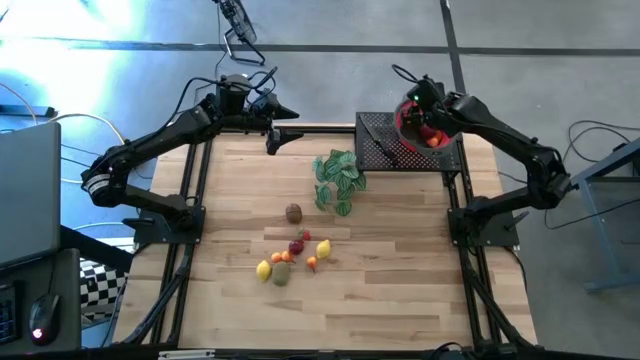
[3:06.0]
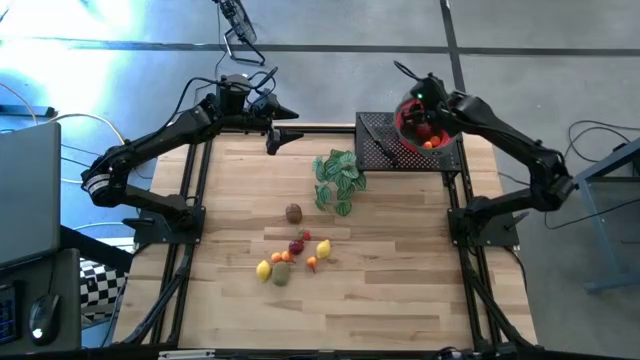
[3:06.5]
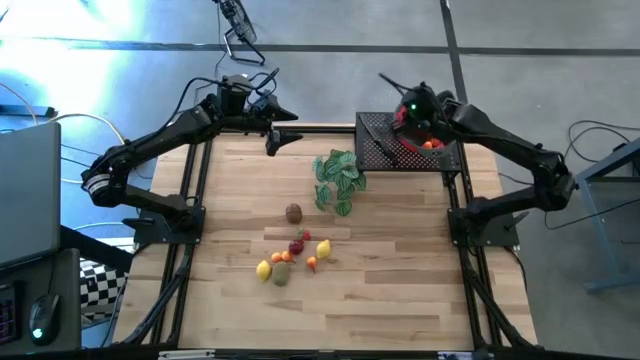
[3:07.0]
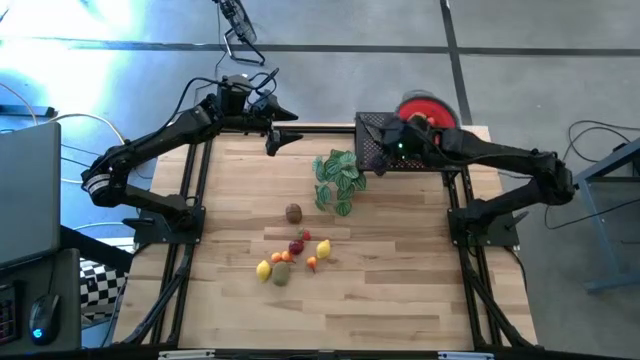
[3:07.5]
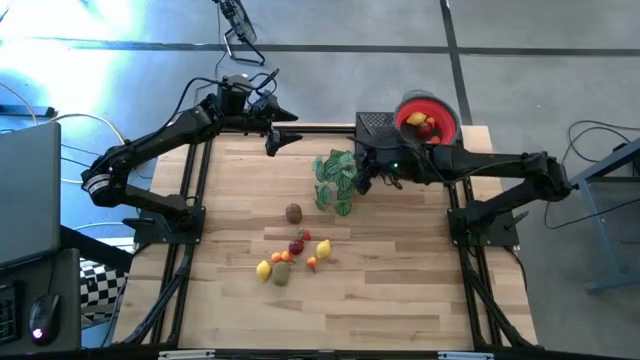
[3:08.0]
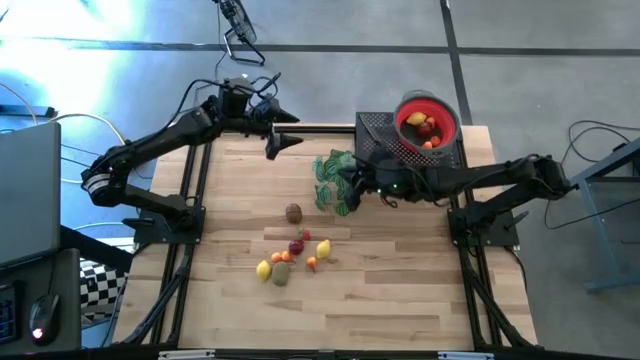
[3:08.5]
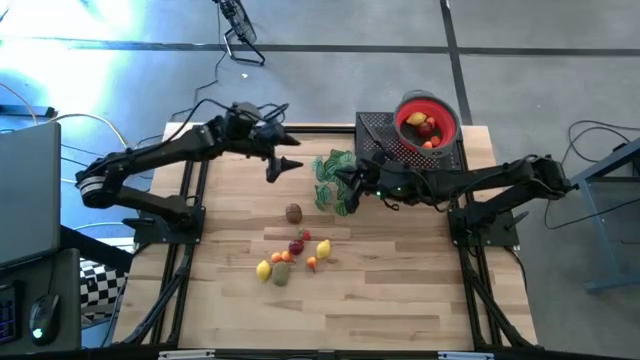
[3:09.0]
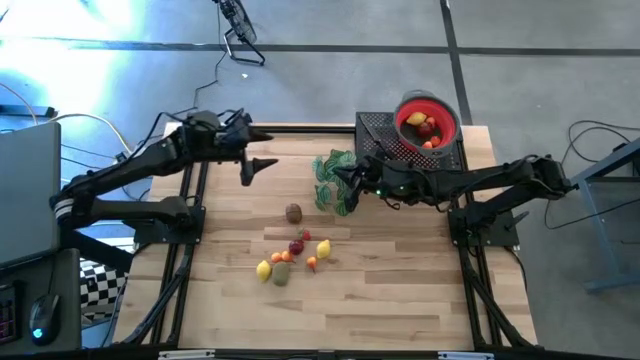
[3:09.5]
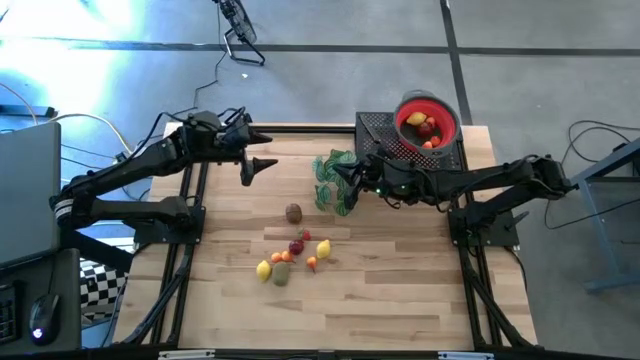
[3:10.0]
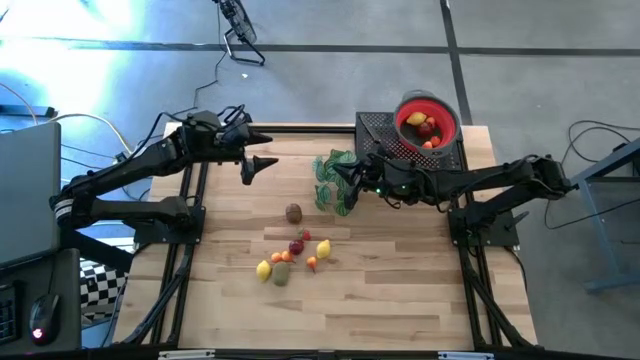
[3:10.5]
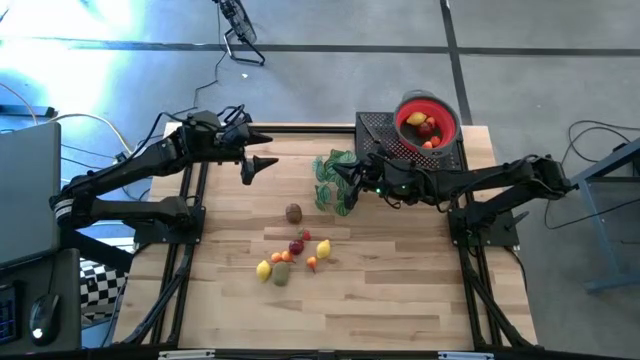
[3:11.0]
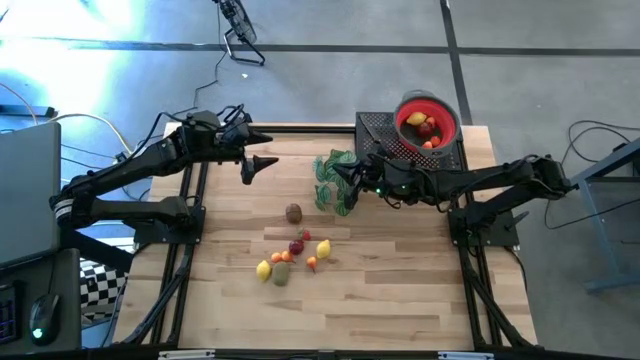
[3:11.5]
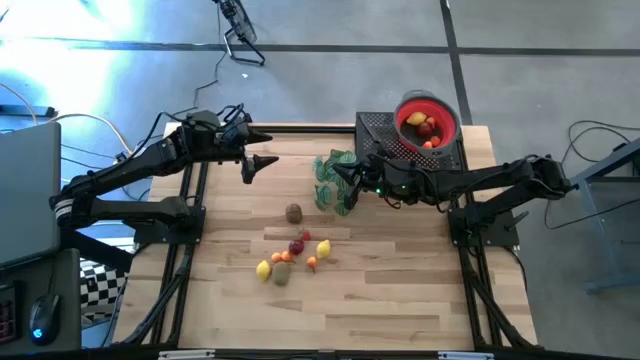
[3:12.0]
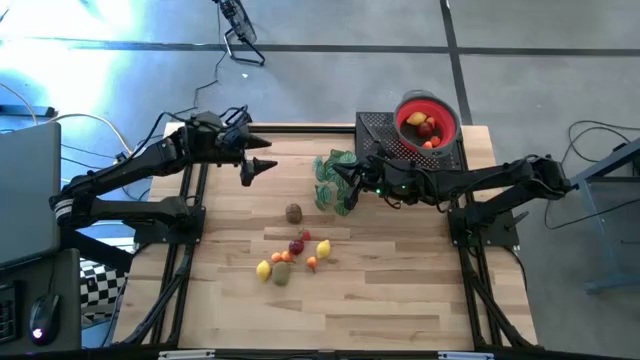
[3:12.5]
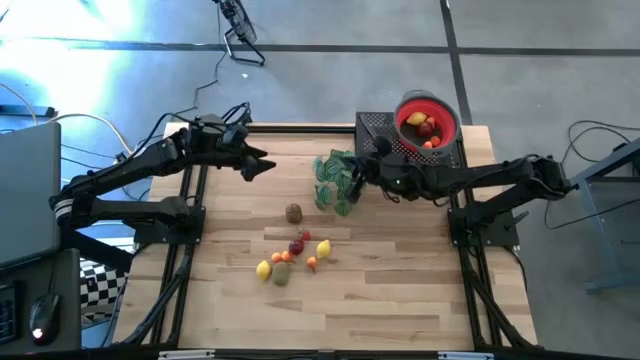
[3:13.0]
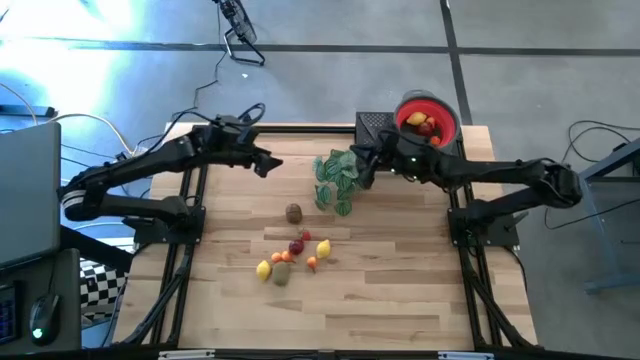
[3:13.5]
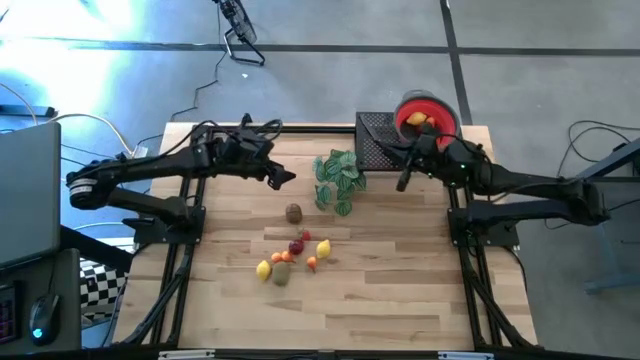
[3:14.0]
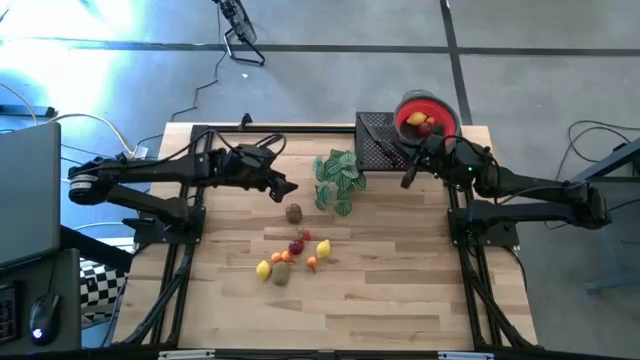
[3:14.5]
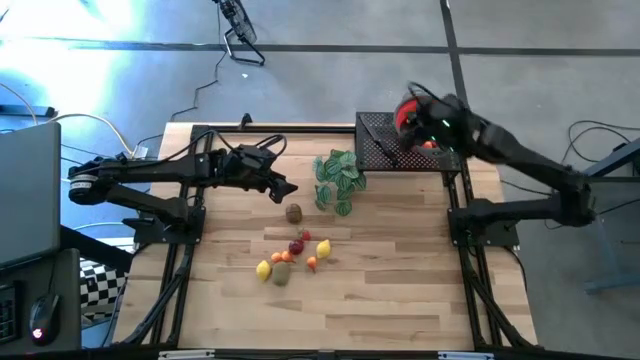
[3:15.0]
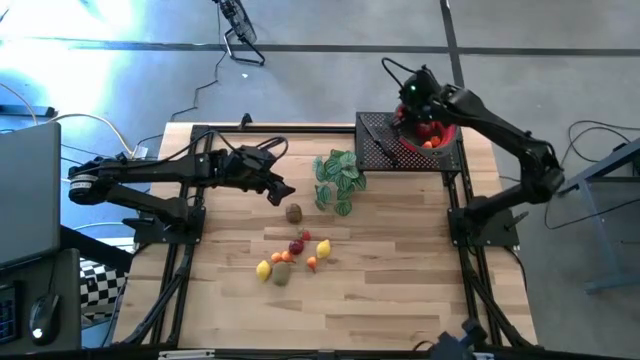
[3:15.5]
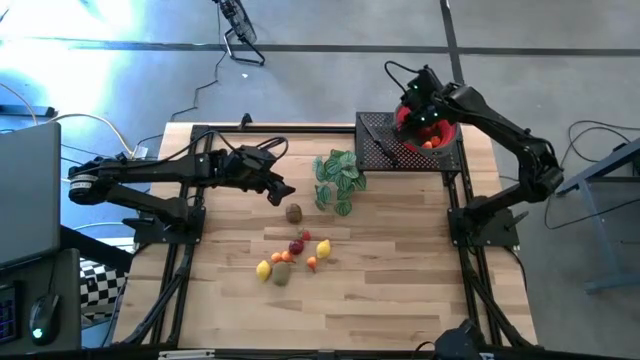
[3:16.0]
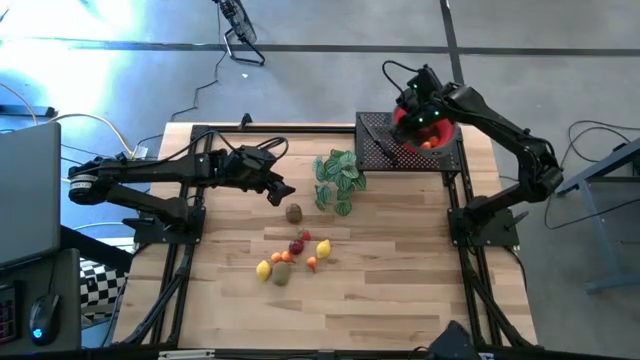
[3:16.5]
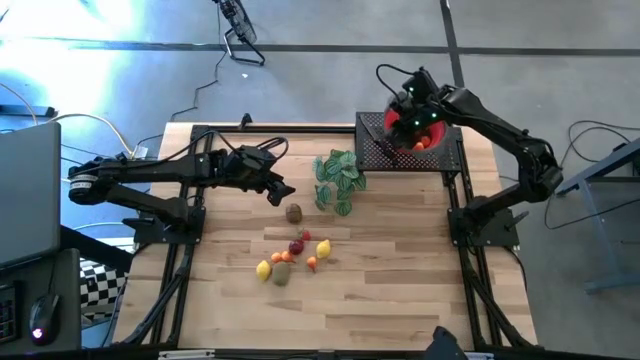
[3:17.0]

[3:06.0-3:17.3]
Task: Pick & Place Fruit
Adjust the red colander on the shelf

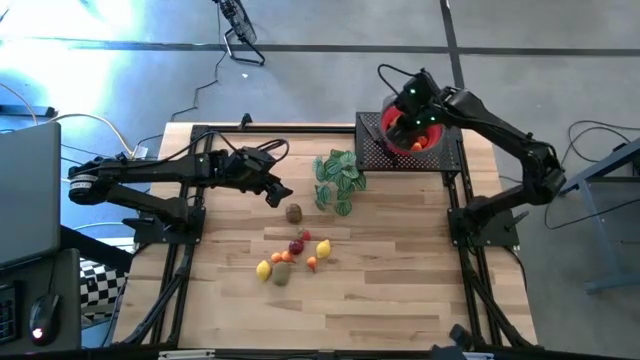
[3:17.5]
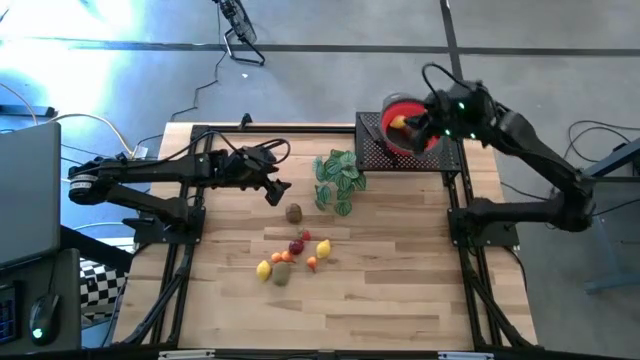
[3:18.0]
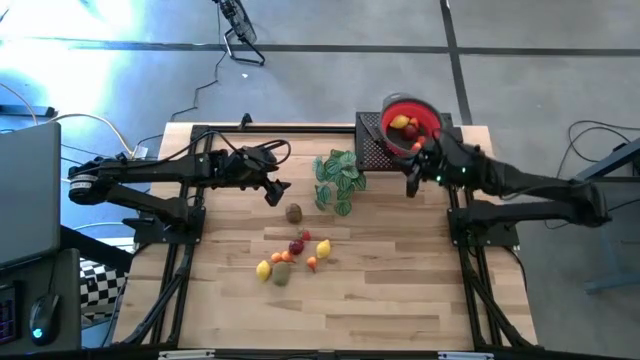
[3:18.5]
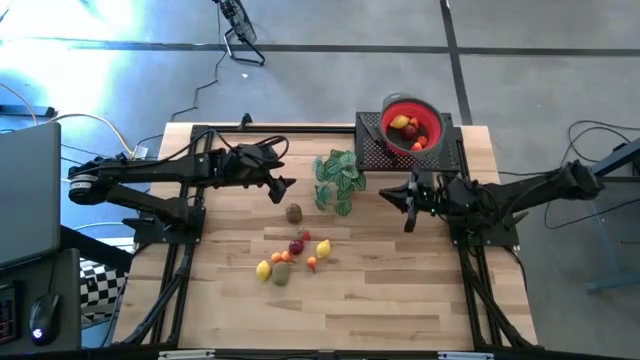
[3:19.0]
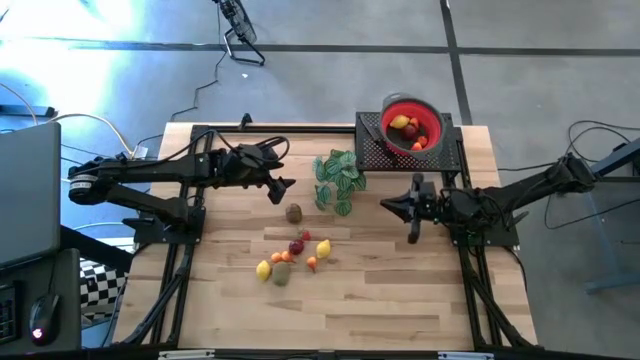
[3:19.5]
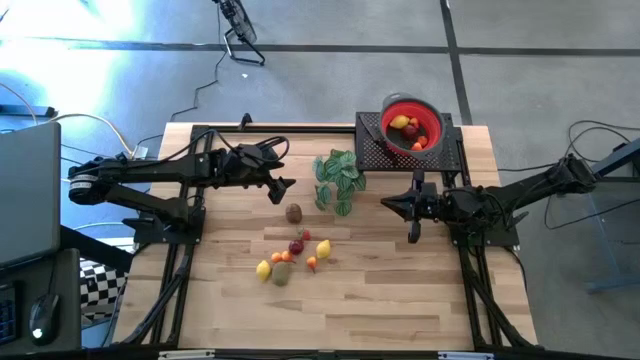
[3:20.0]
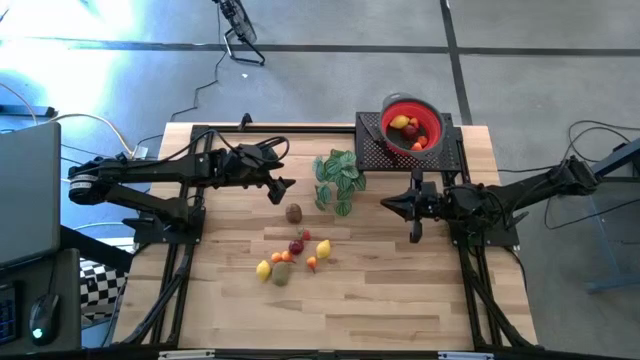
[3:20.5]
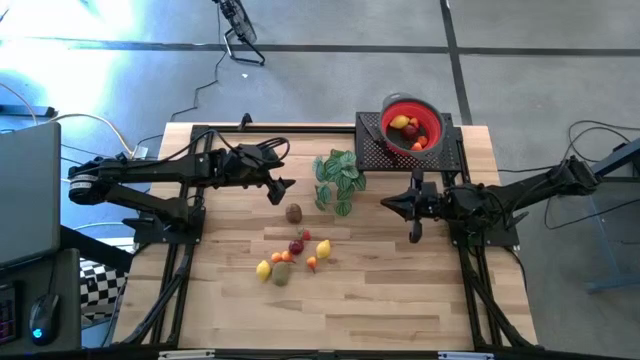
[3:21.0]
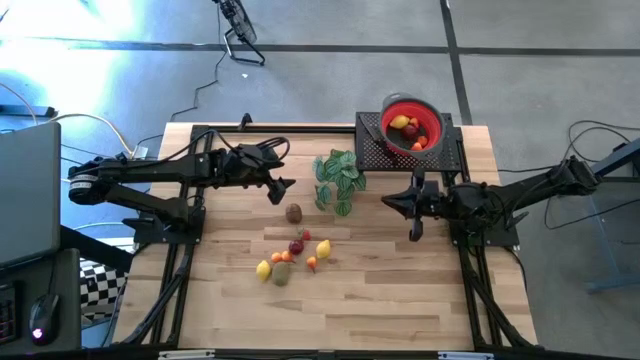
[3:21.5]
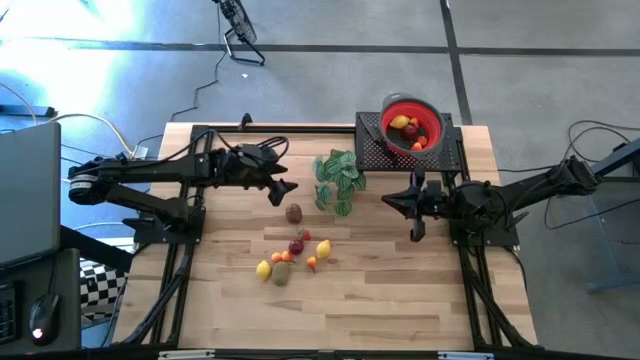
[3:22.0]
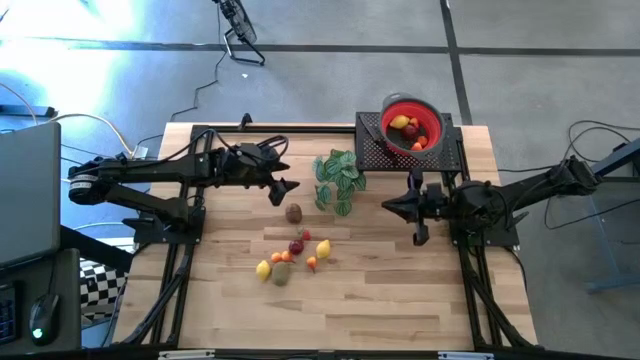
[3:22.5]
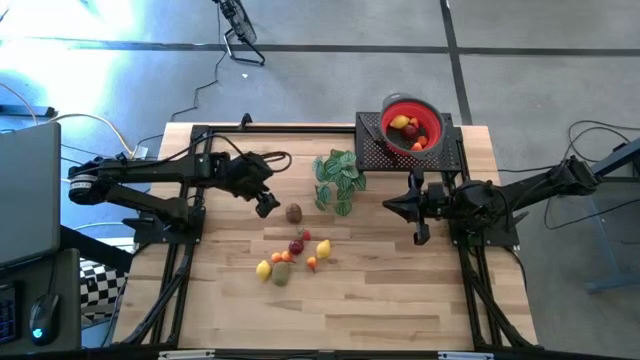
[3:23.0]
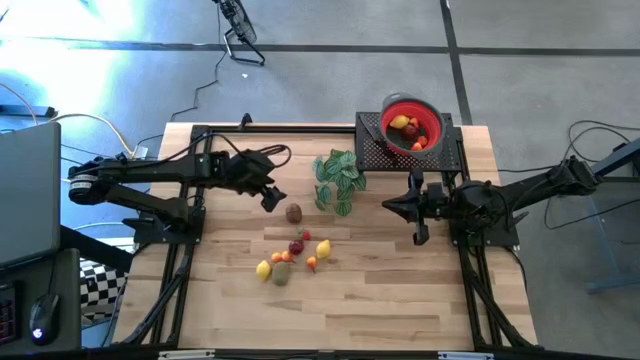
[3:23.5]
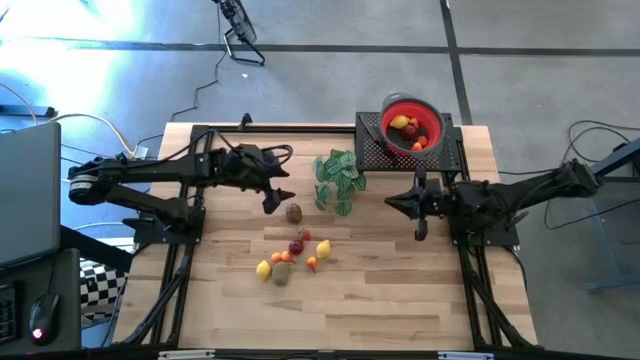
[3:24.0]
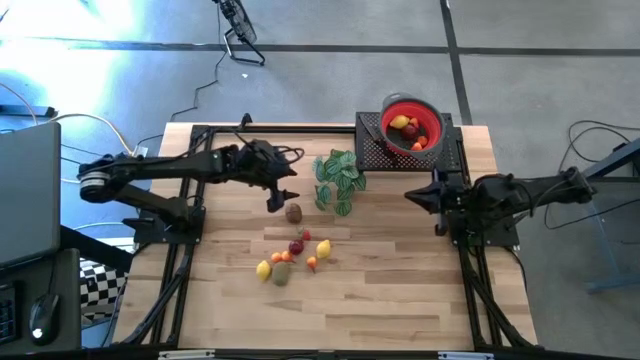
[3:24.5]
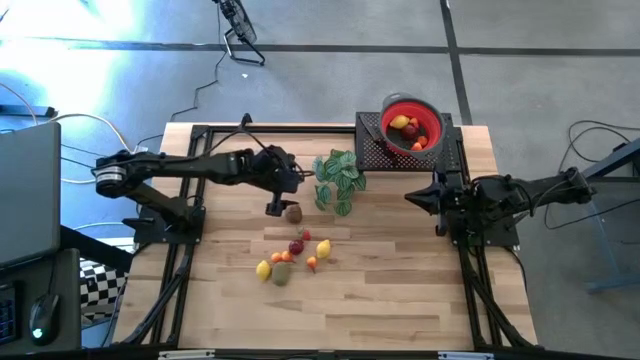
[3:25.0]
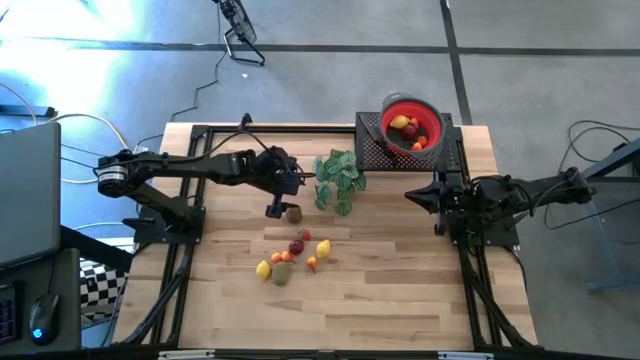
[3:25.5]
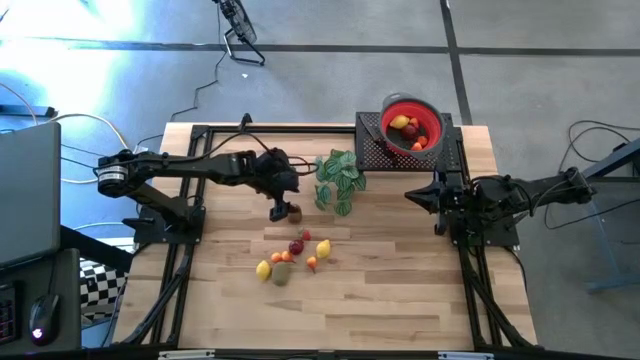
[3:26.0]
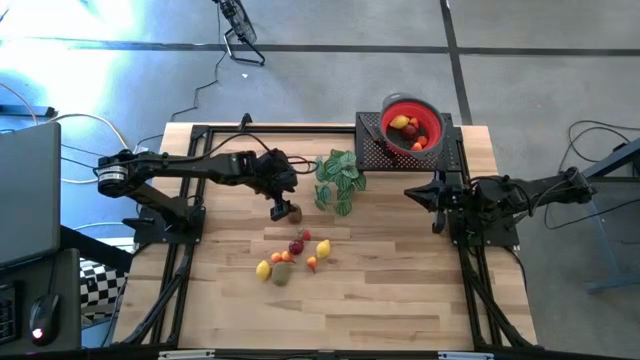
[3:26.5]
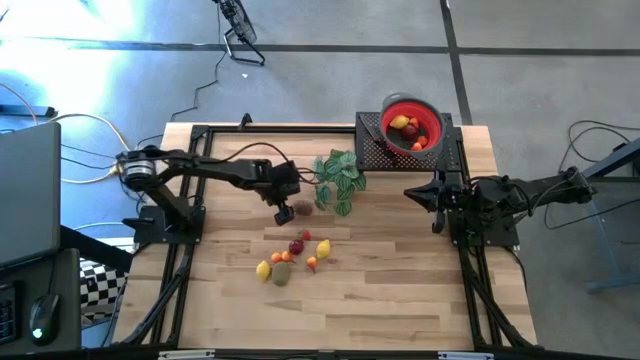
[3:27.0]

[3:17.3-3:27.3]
Put the kiwi into the red colander
